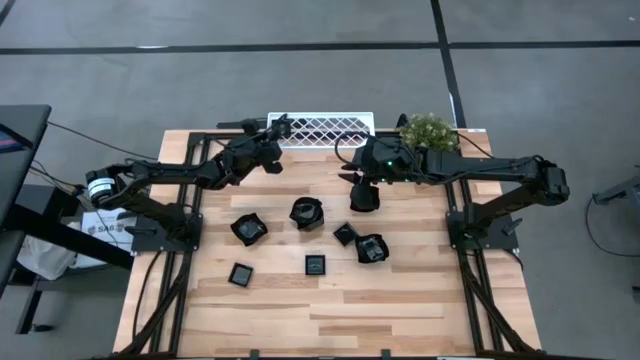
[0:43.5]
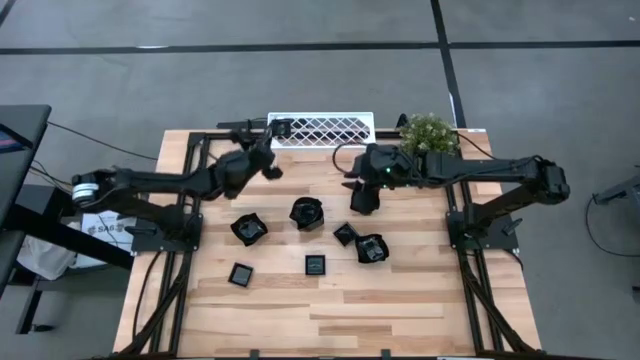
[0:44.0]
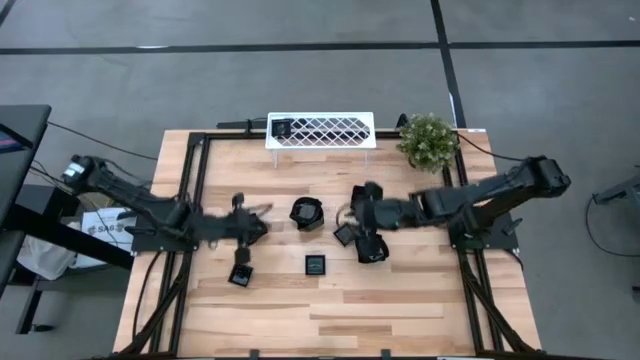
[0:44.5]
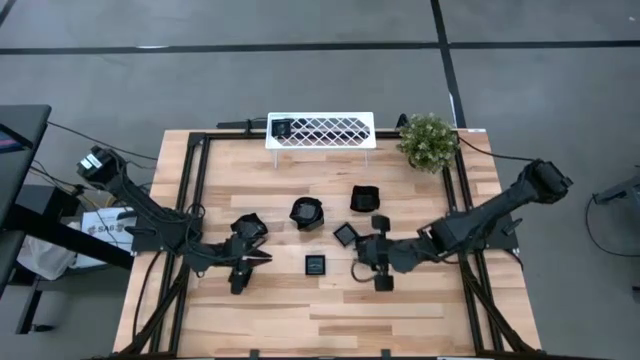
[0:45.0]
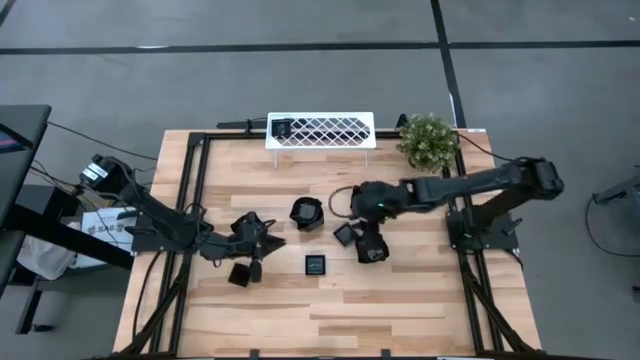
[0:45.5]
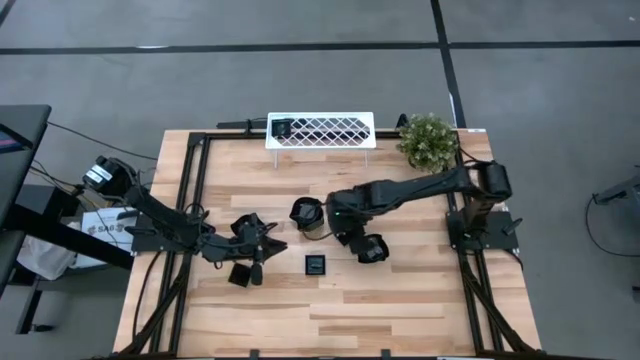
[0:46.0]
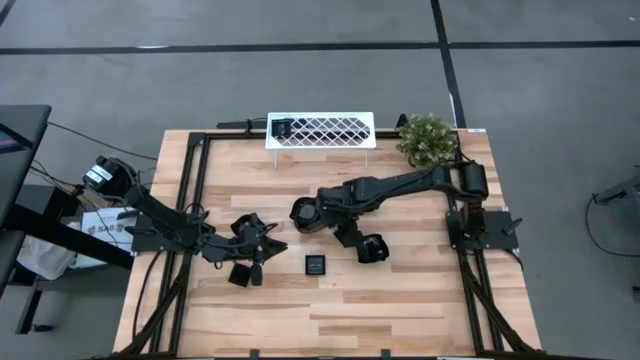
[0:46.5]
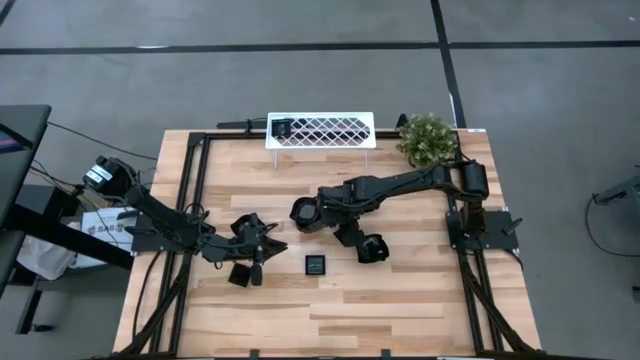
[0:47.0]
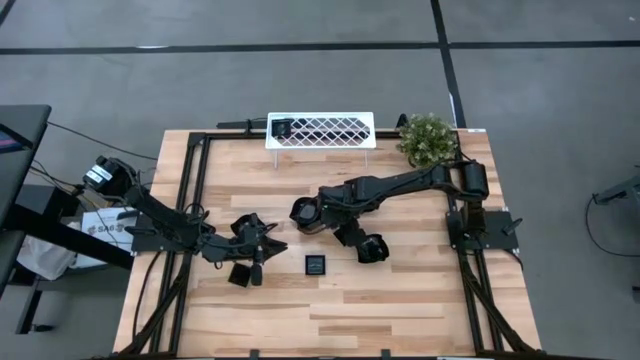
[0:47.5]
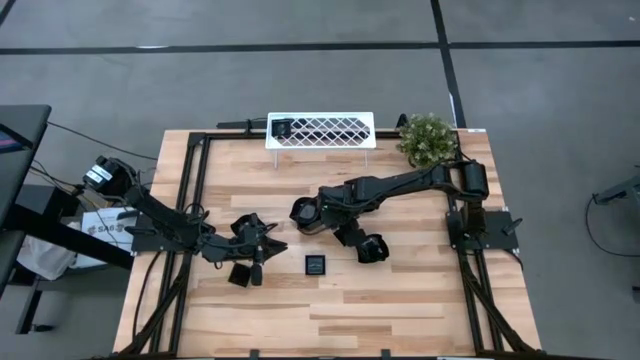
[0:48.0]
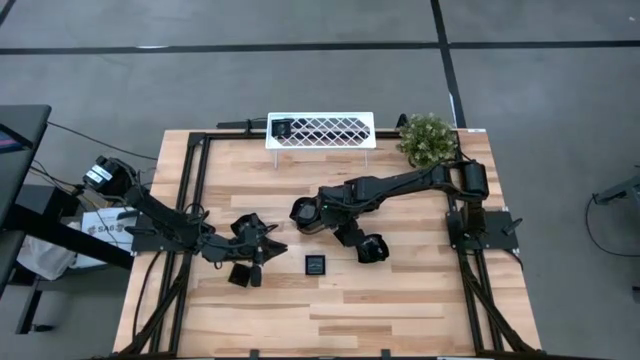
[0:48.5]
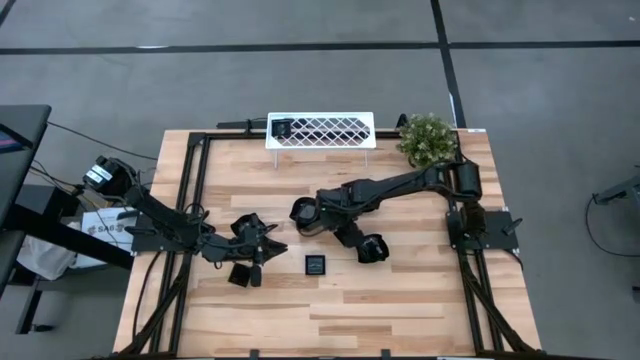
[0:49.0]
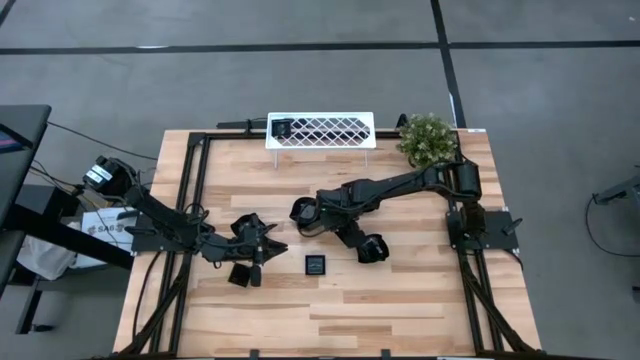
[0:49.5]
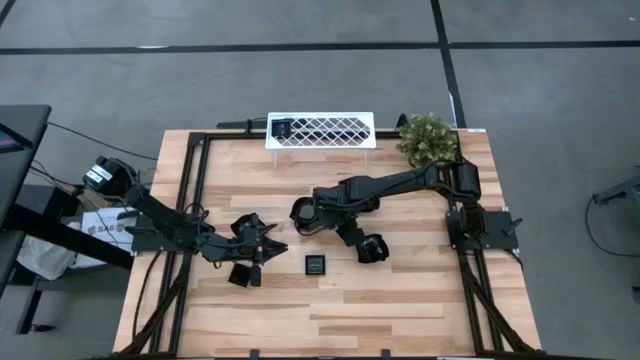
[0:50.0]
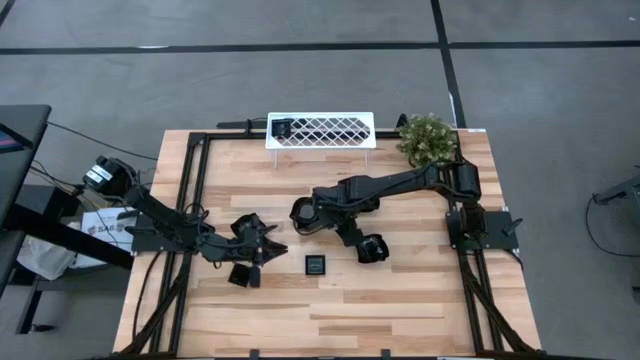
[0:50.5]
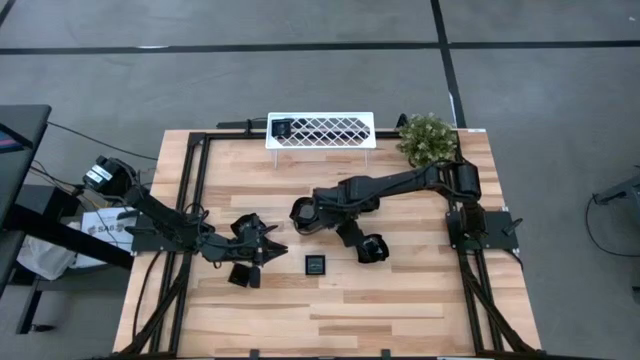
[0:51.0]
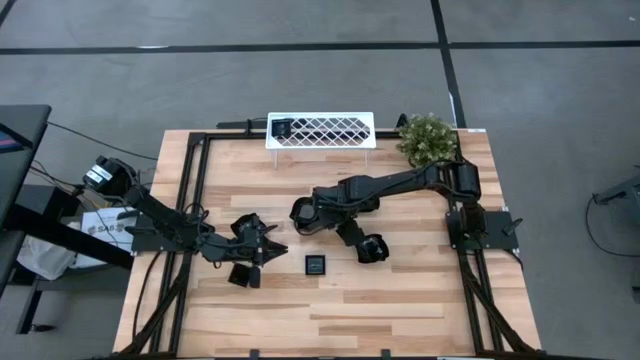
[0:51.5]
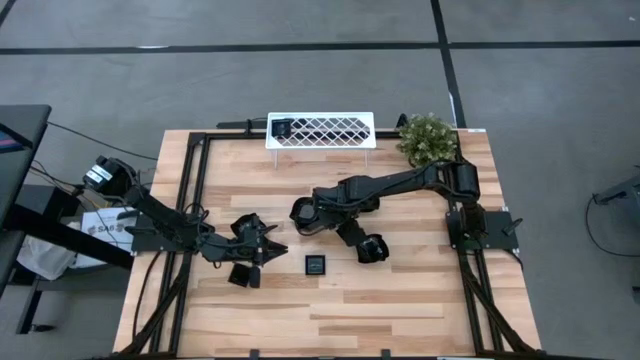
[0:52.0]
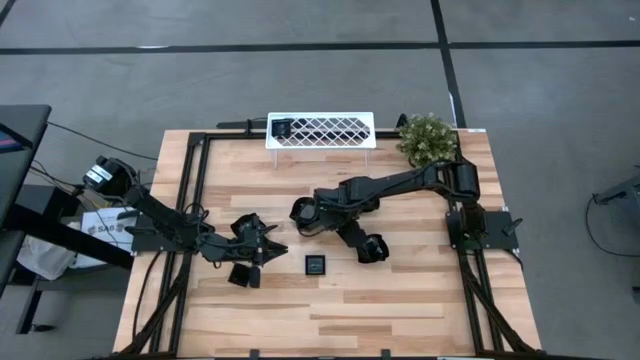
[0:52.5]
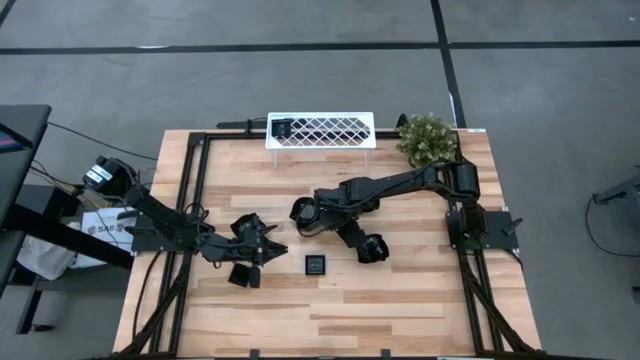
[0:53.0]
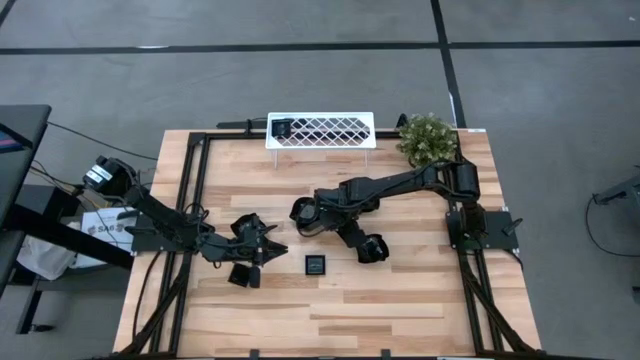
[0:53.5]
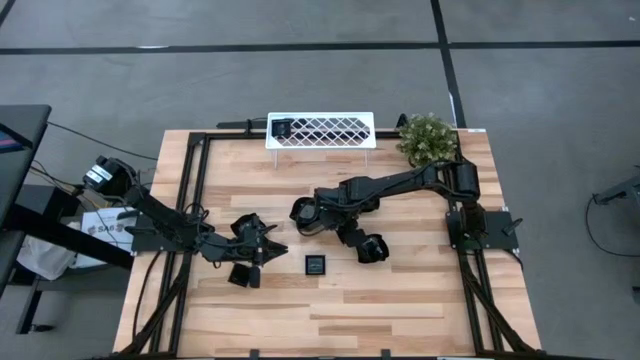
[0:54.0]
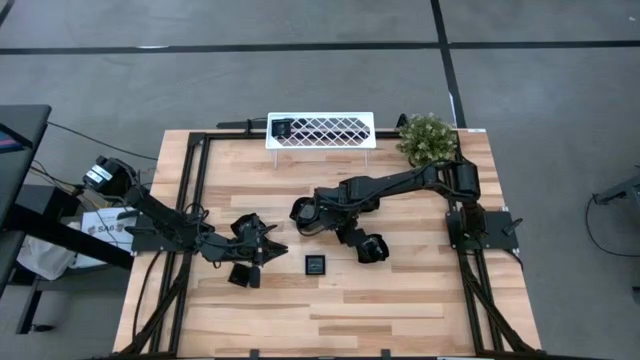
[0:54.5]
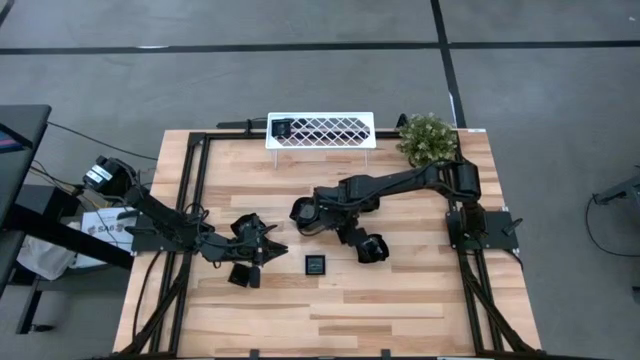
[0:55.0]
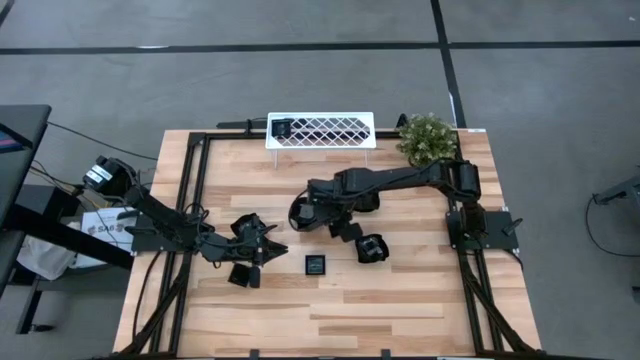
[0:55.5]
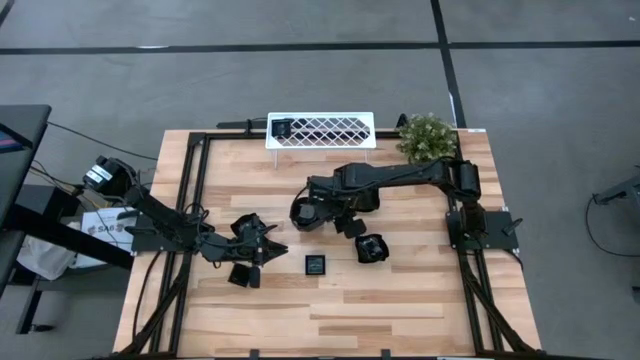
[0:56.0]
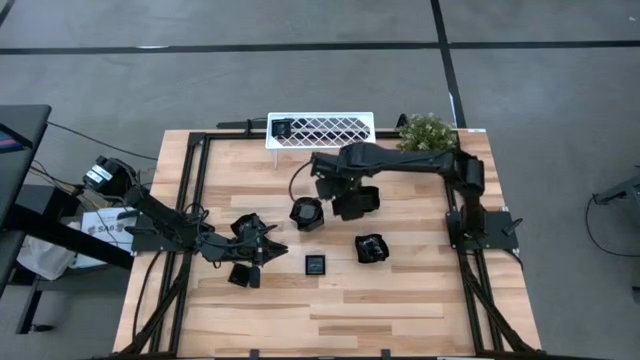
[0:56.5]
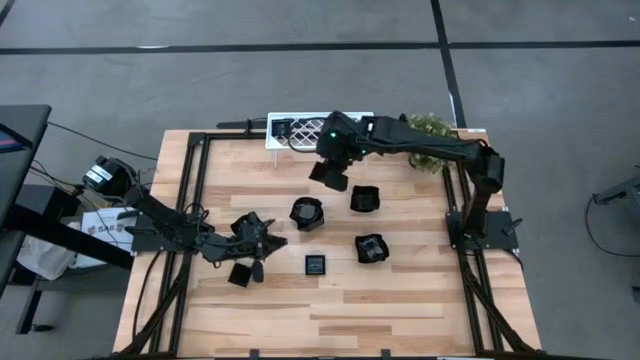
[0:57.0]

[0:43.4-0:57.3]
Task: Pick & Place Mini shaped plates
Stack the top black square plate on top of the black square plate on the shelf

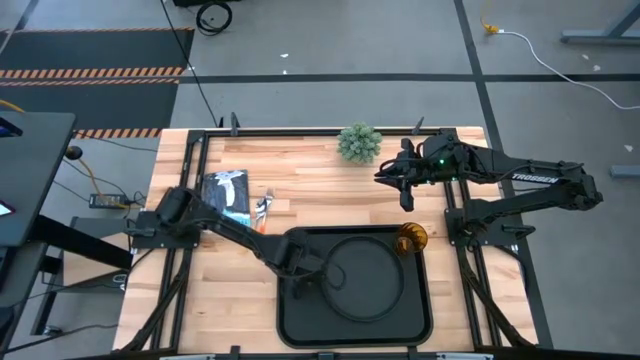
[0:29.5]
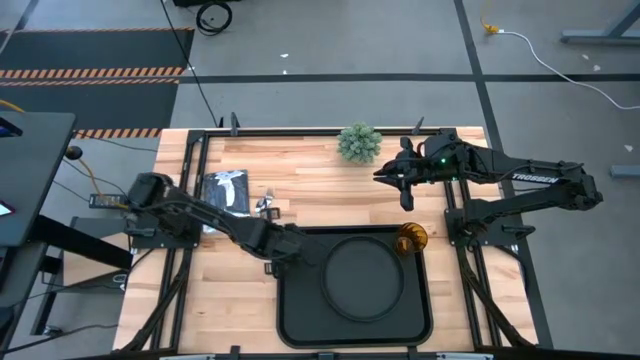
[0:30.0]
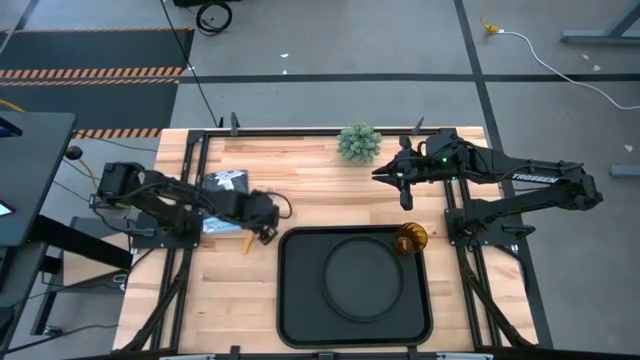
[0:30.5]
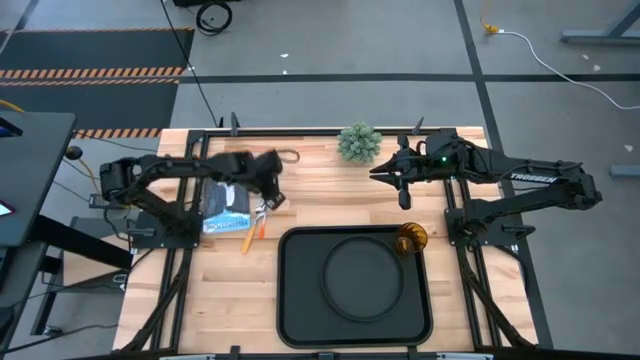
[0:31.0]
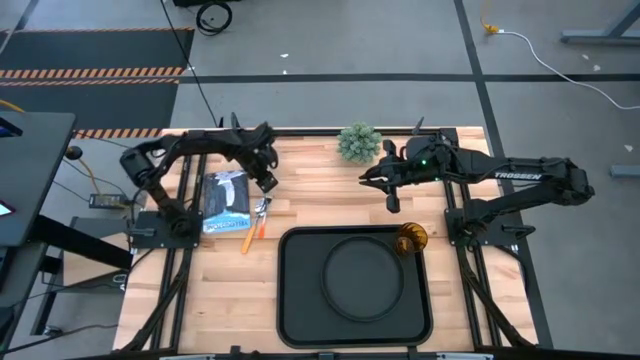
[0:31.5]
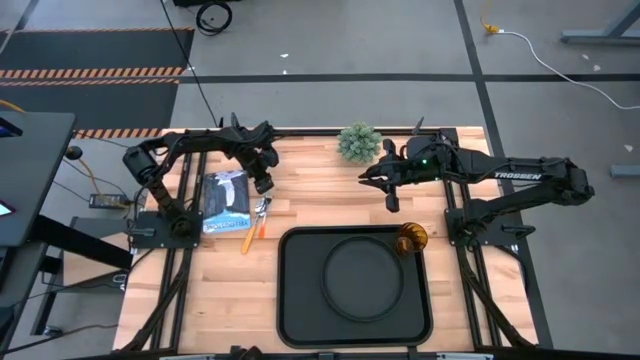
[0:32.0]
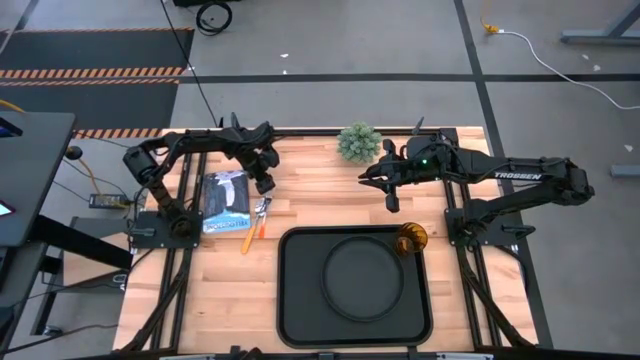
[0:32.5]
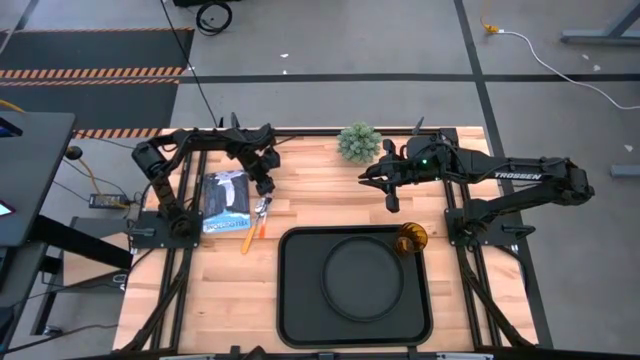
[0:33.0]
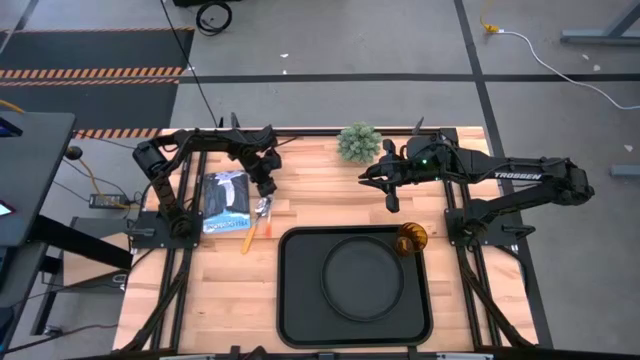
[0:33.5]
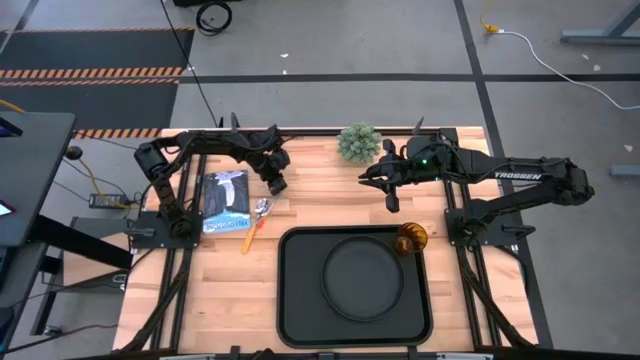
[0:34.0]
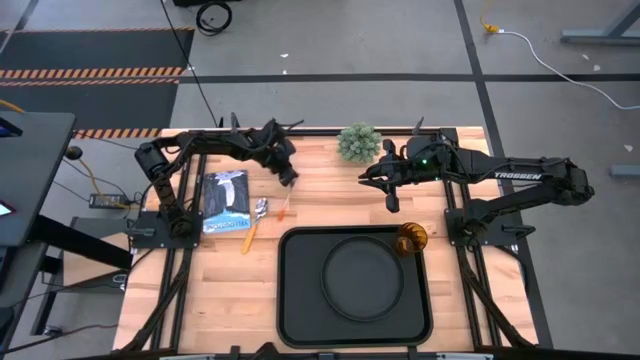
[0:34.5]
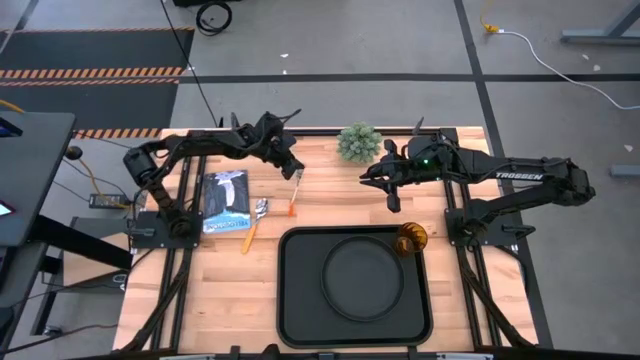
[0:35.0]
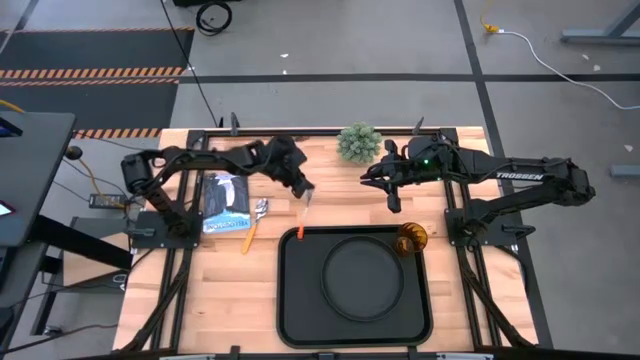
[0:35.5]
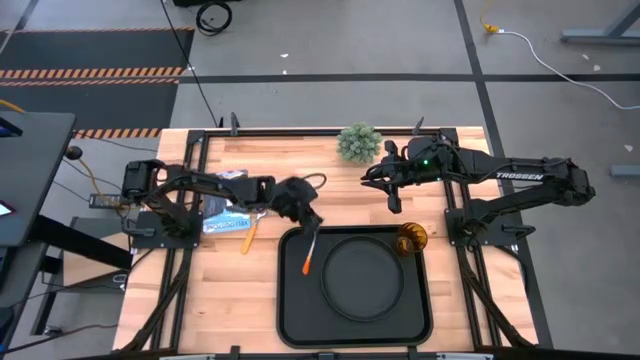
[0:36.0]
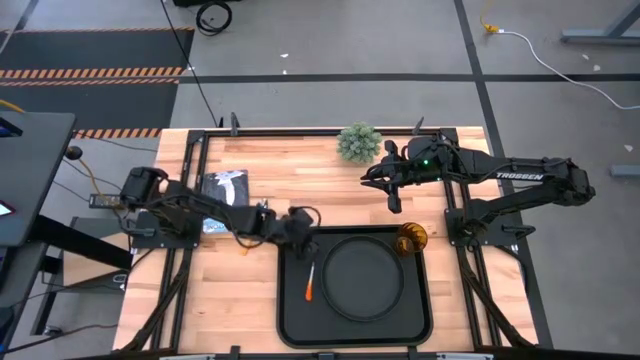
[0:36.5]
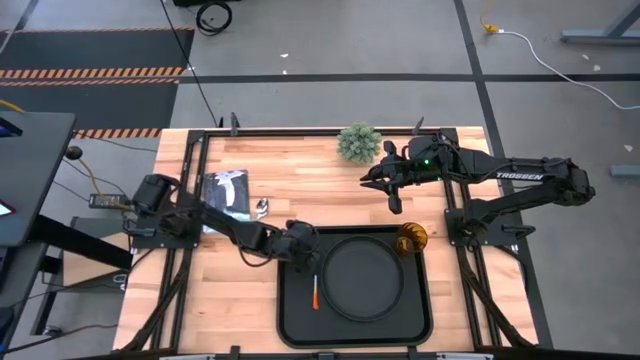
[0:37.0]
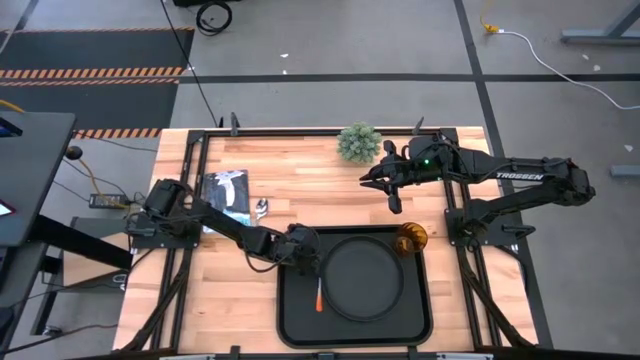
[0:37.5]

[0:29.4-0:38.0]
Task: Pick and place plate/cup/fork/spoon on tray
Put the orange fork to the left side of the black plate on the black serving tray
